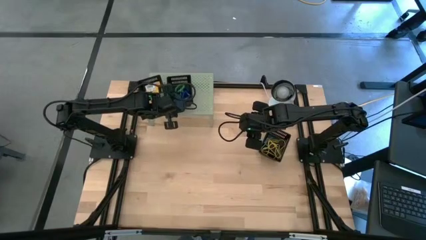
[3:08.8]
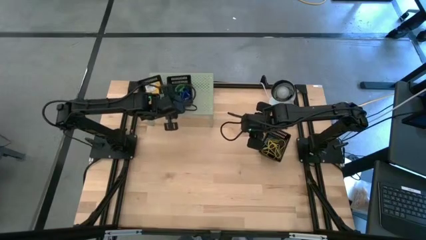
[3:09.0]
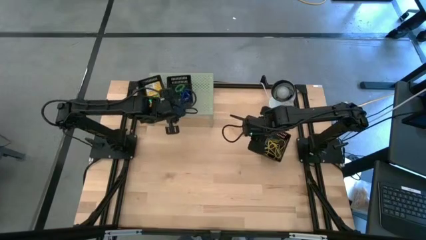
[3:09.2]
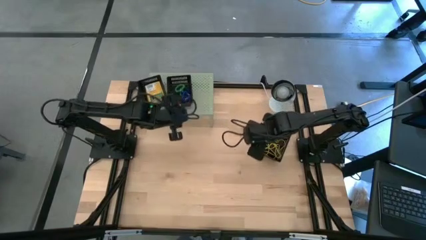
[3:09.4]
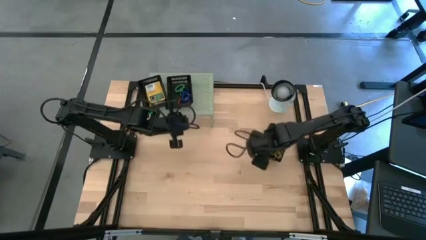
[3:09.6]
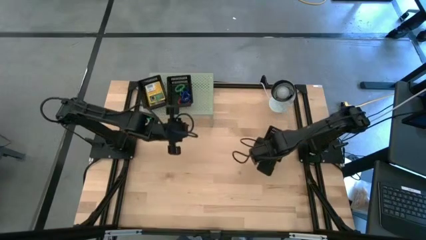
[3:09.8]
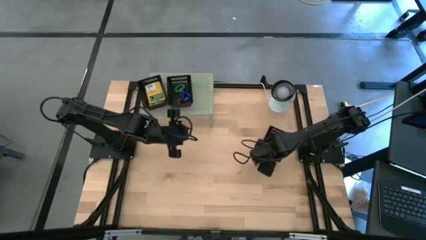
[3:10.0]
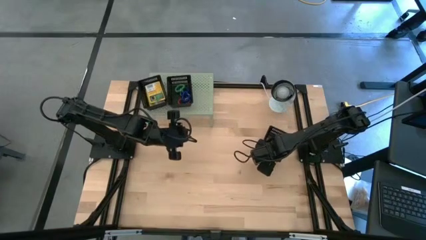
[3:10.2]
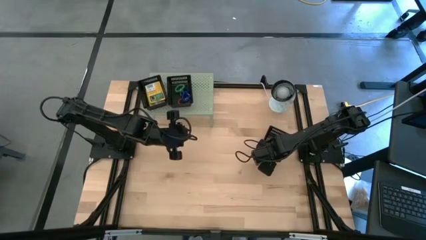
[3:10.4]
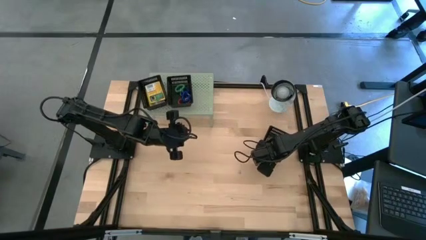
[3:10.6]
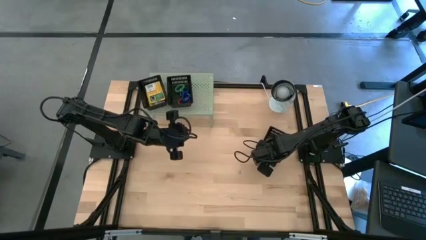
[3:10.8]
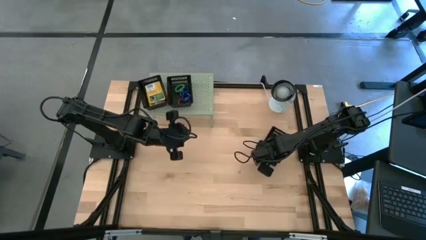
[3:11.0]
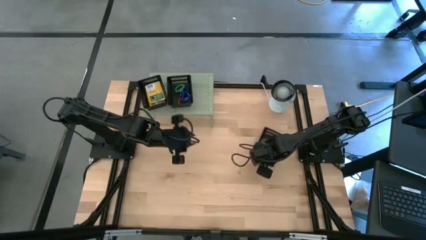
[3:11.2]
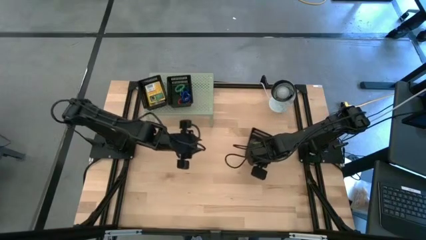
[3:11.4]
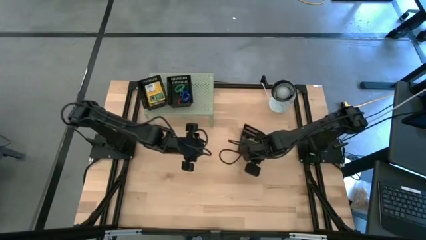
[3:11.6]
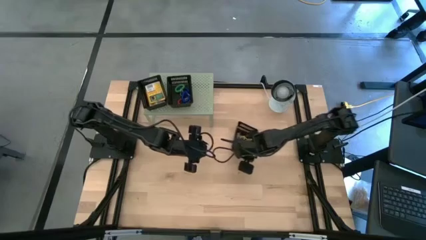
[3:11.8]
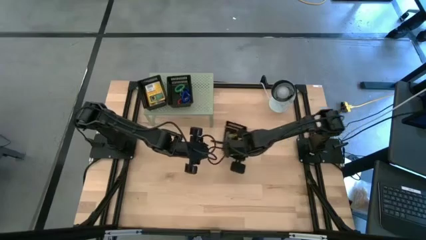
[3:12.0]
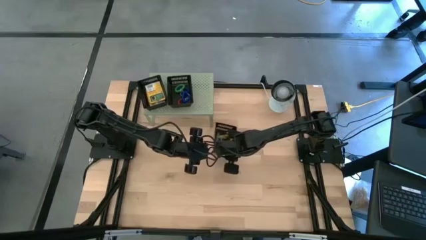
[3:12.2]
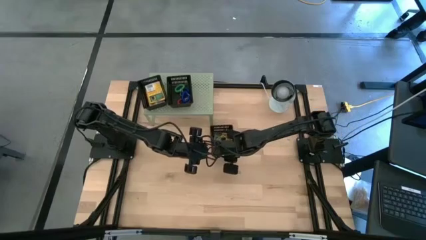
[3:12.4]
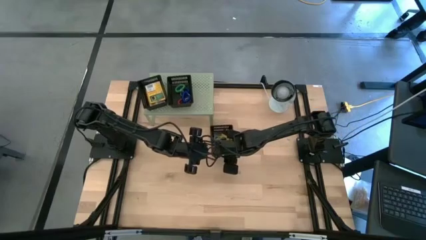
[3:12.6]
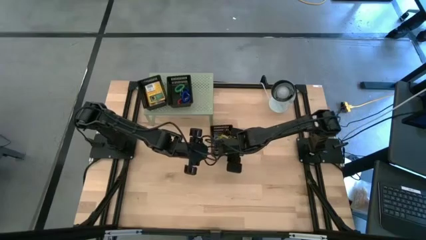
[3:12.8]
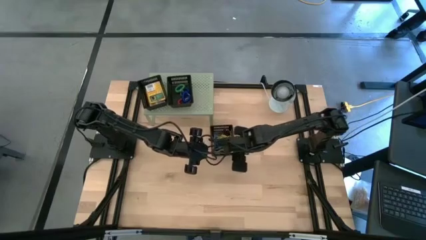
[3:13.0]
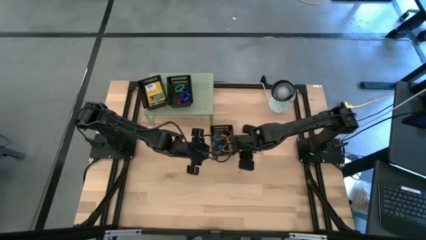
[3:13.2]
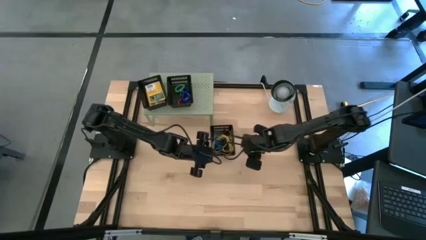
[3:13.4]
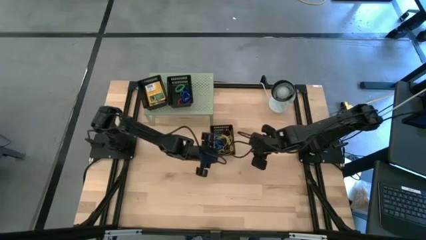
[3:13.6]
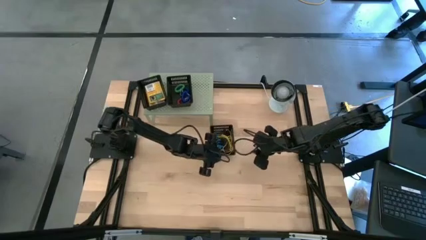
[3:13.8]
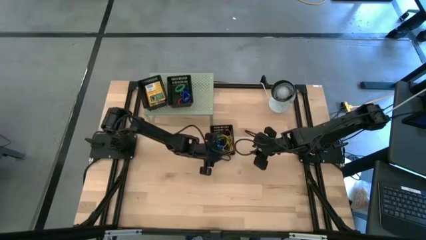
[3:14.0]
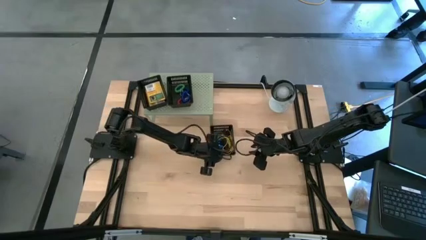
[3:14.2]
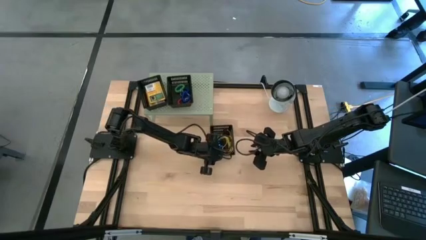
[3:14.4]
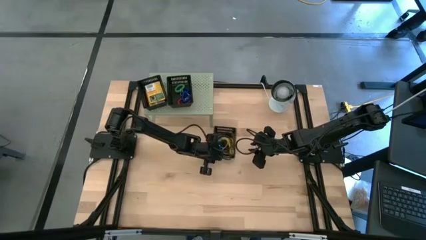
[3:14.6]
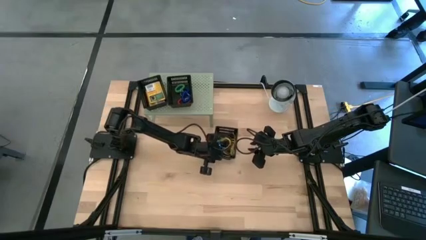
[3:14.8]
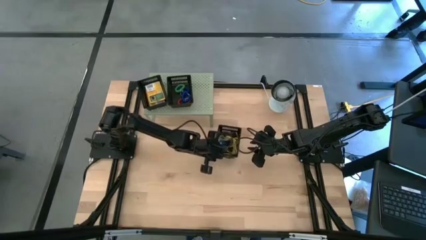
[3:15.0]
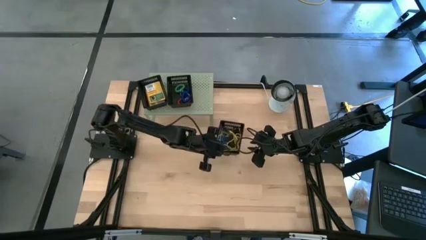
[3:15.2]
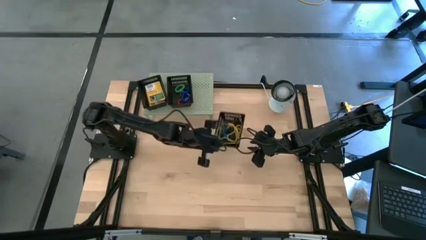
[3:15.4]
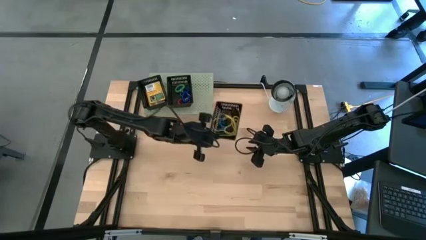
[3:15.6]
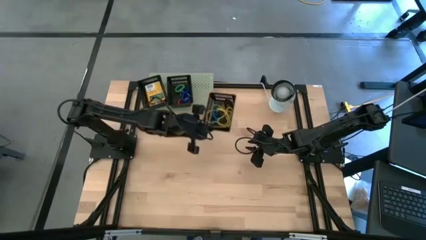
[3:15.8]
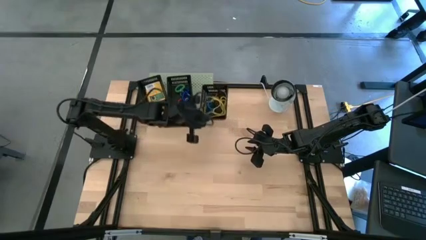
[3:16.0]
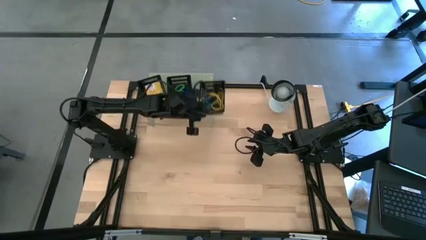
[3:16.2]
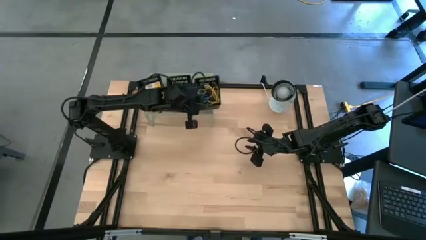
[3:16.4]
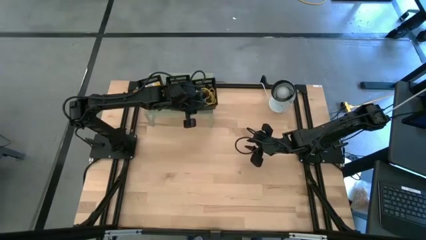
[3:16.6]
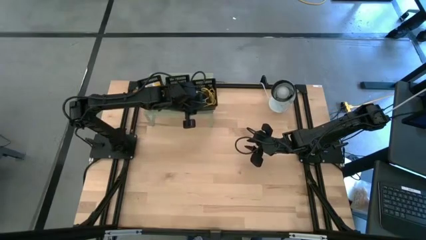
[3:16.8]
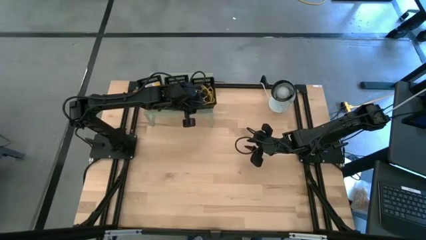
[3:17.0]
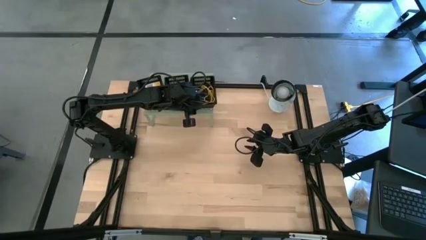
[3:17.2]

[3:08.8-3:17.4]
Task: Pick & Place Office Desk Supplies
Put the black bin on the shelf

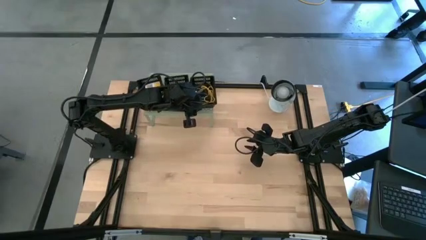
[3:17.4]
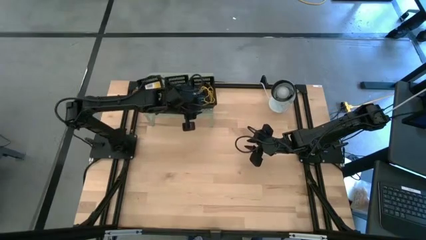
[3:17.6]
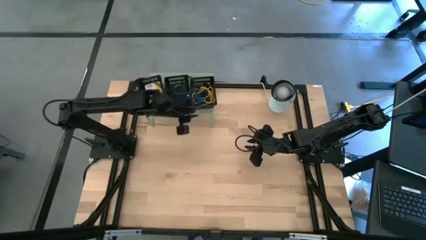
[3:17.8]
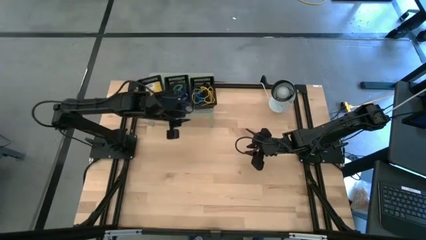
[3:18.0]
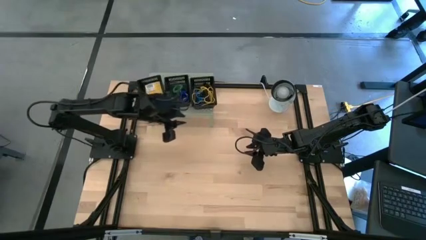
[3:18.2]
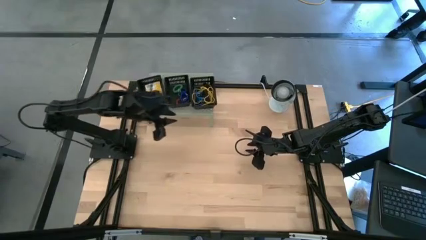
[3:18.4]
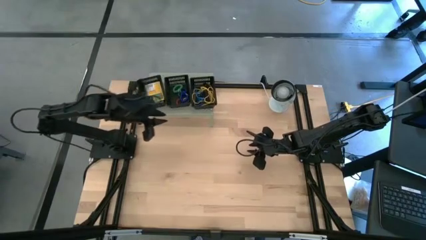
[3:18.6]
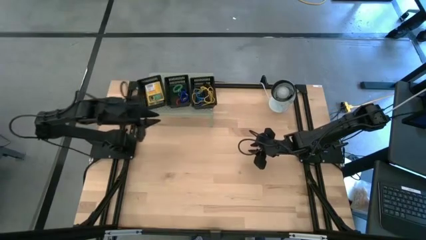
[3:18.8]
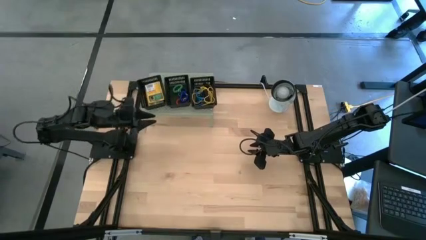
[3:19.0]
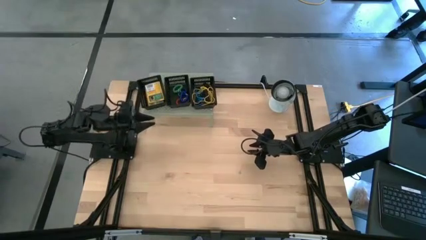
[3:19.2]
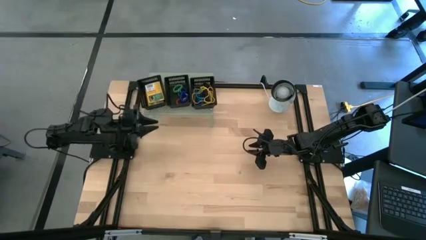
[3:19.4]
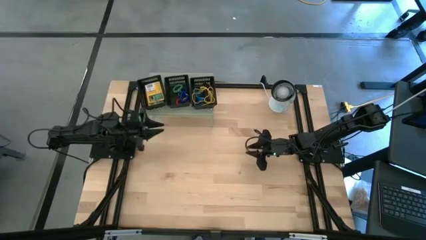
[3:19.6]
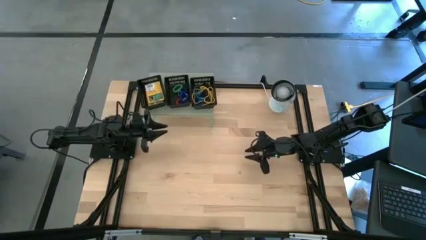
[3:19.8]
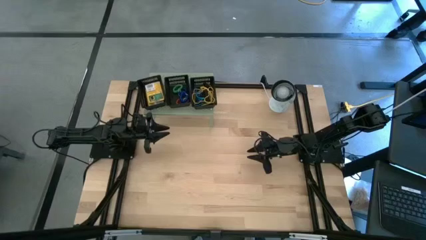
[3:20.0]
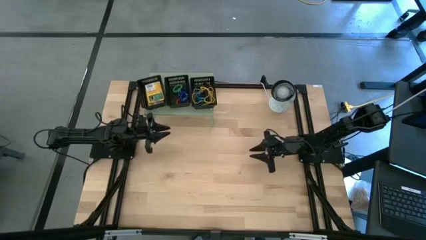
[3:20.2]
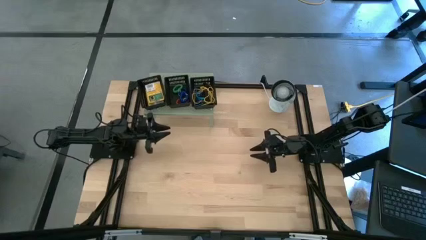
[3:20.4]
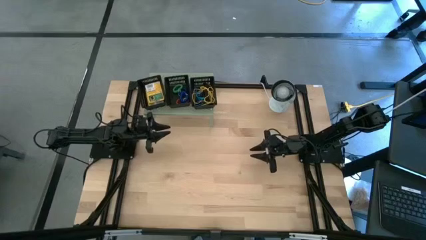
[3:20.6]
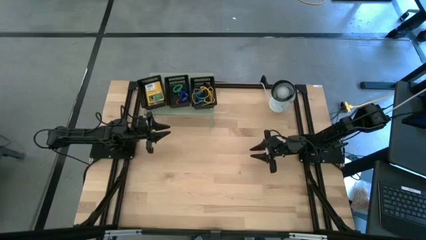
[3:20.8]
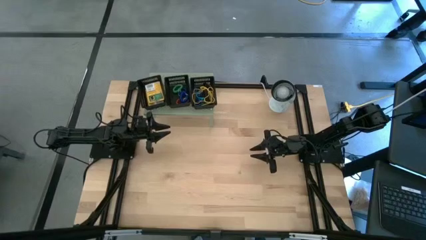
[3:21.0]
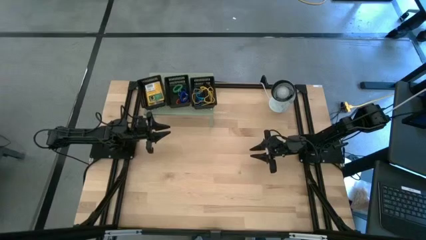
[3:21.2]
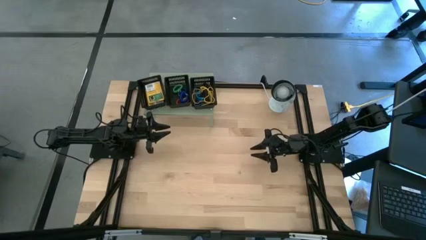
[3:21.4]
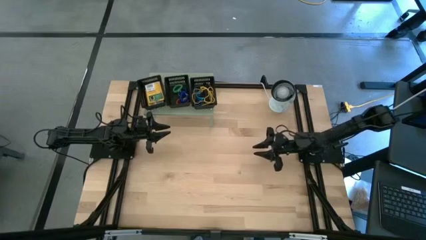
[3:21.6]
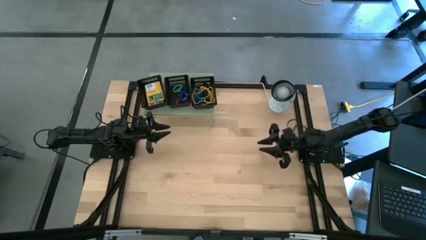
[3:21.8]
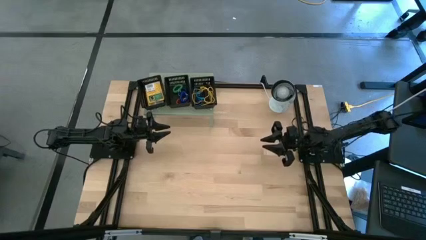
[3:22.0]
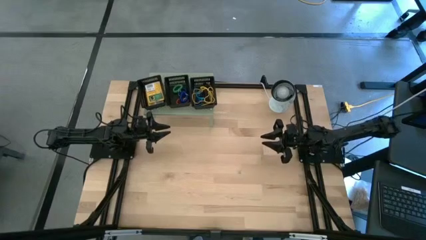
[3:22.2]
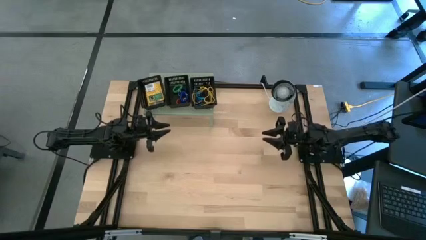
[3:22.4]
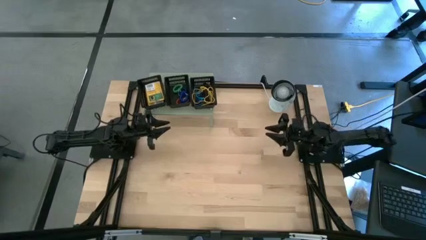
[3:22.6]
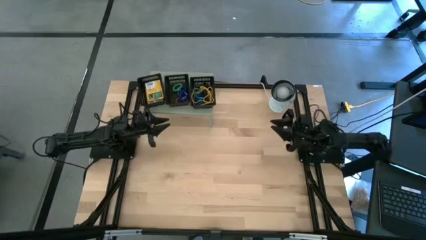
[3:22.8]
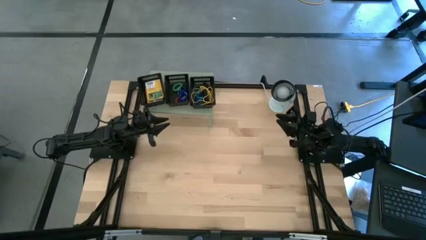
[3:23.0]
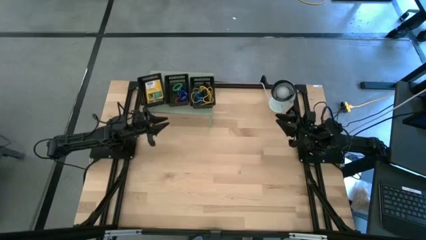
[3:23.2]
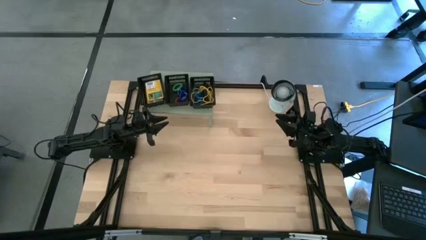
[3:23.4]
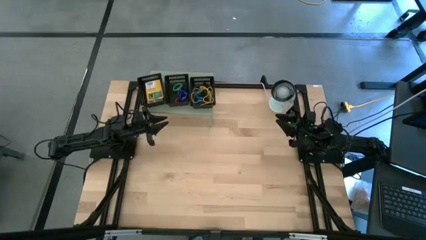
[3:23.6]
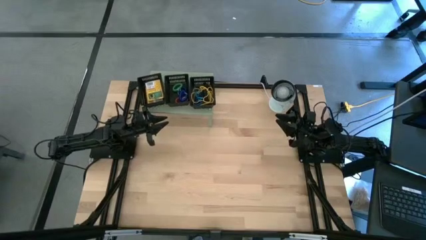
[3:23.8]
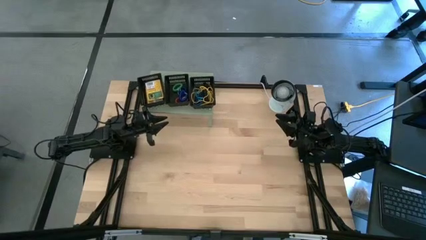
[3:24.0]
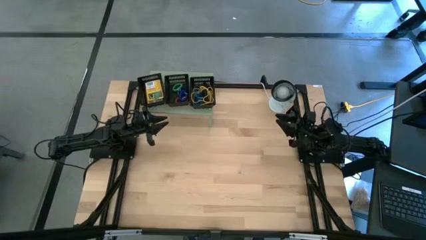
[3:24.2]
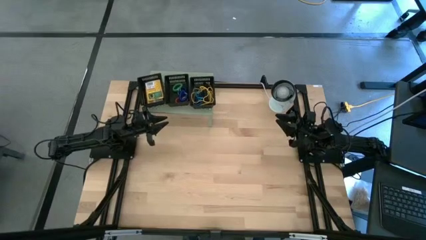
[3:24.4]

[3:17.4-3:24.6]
Return to Home Position
